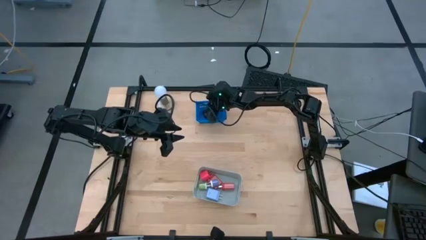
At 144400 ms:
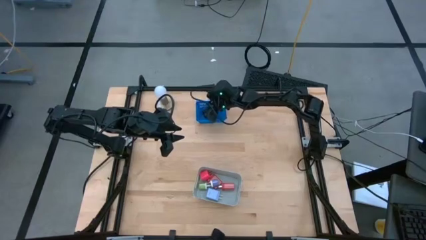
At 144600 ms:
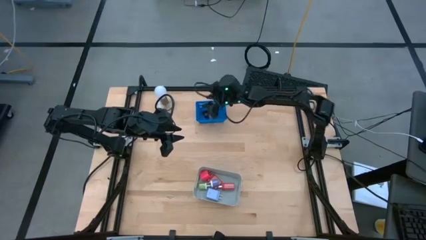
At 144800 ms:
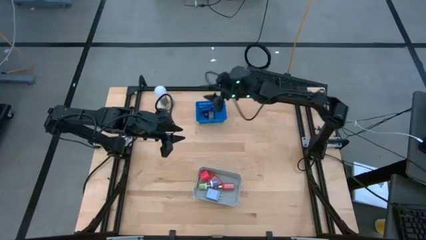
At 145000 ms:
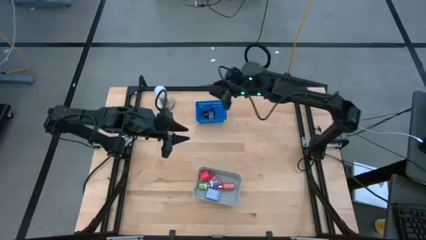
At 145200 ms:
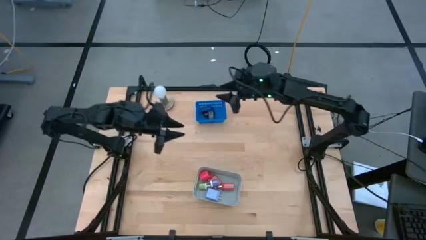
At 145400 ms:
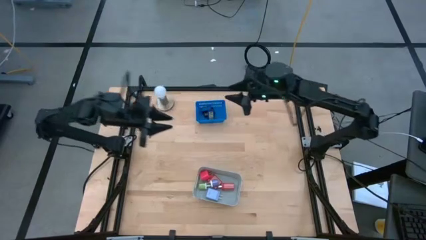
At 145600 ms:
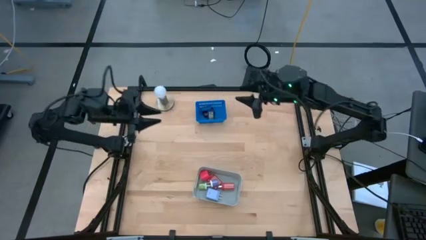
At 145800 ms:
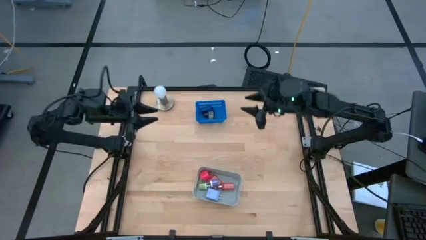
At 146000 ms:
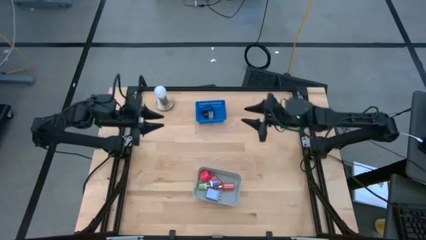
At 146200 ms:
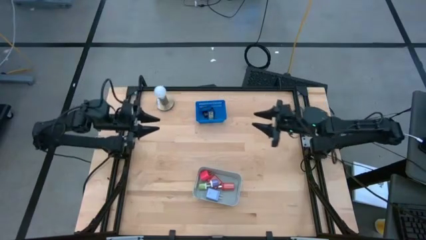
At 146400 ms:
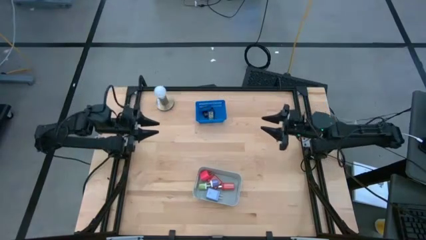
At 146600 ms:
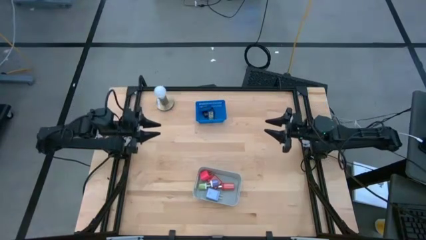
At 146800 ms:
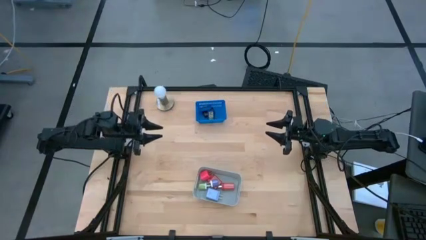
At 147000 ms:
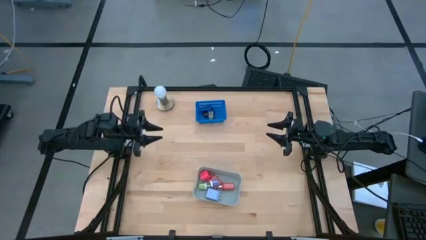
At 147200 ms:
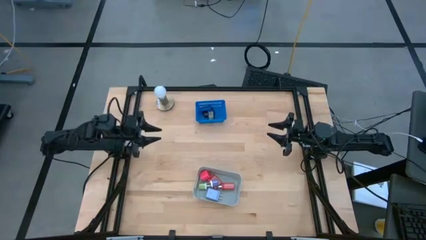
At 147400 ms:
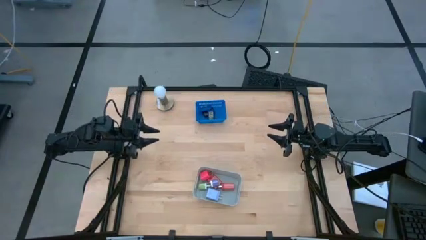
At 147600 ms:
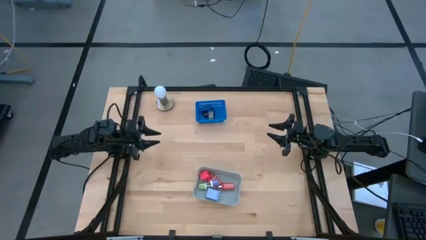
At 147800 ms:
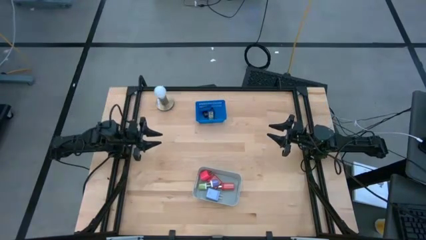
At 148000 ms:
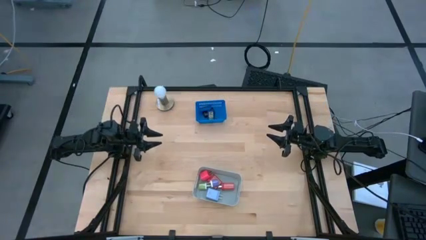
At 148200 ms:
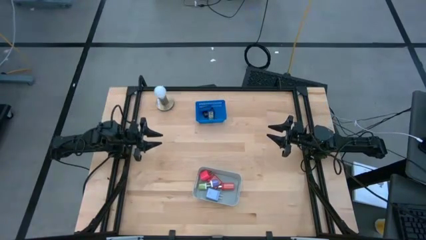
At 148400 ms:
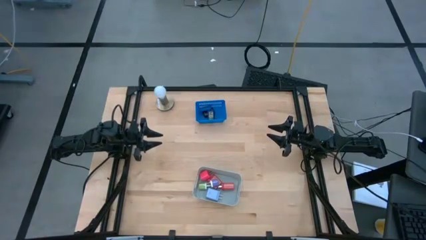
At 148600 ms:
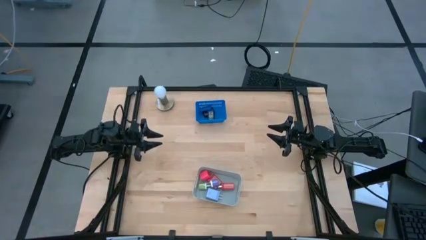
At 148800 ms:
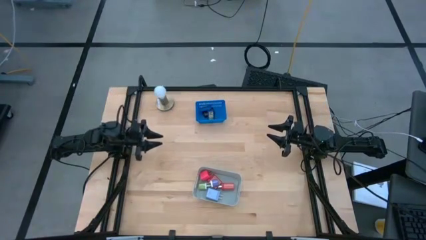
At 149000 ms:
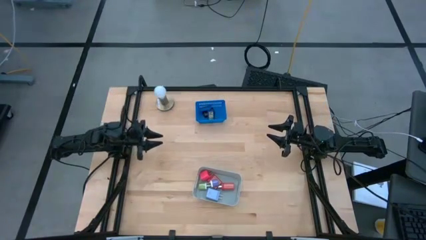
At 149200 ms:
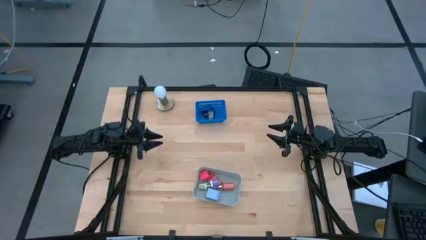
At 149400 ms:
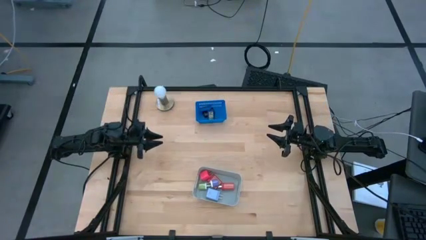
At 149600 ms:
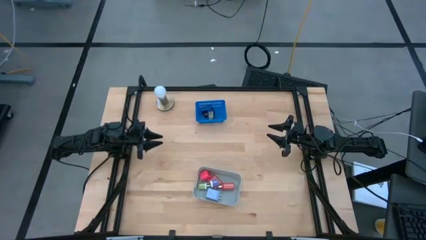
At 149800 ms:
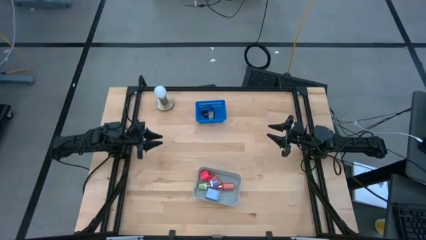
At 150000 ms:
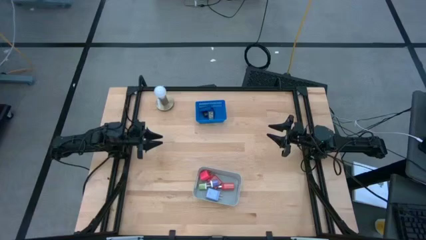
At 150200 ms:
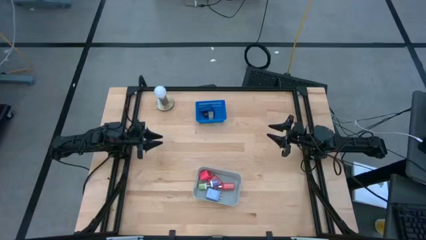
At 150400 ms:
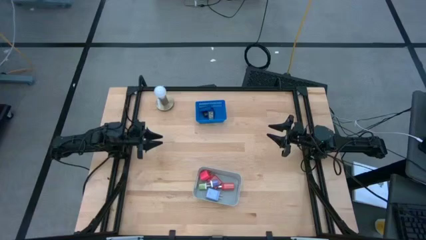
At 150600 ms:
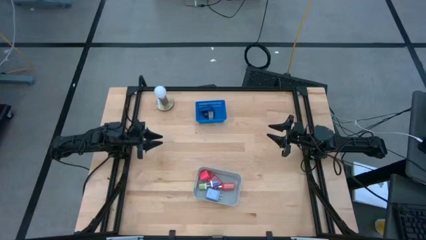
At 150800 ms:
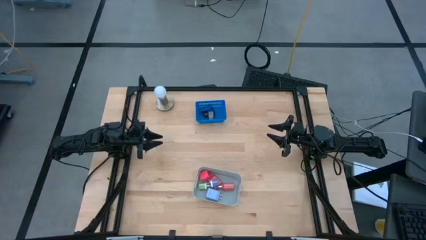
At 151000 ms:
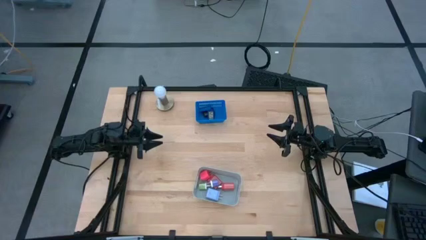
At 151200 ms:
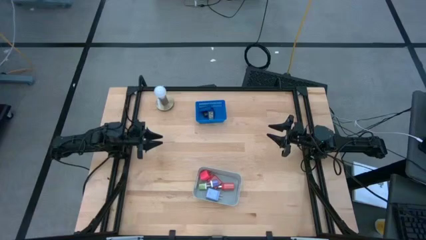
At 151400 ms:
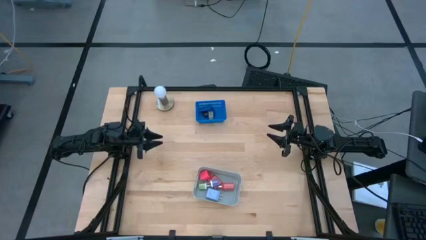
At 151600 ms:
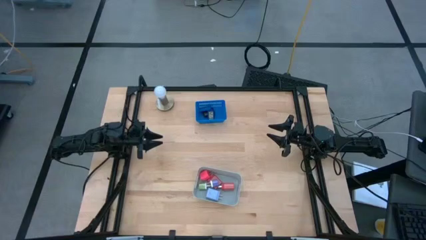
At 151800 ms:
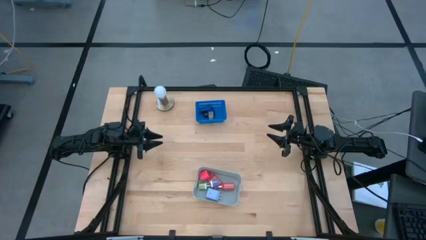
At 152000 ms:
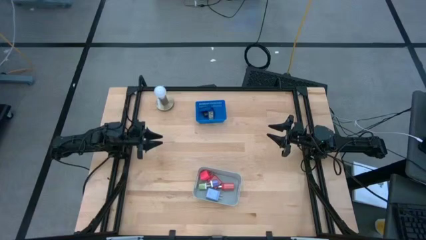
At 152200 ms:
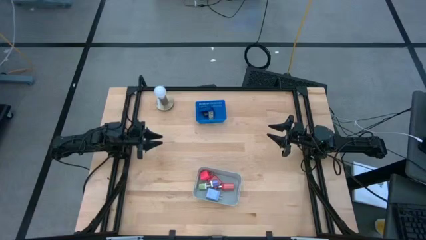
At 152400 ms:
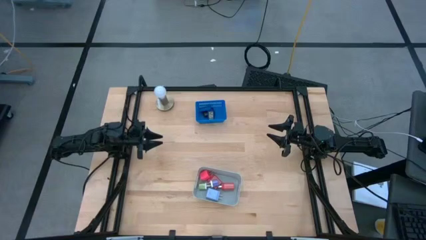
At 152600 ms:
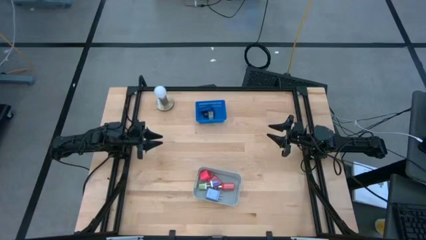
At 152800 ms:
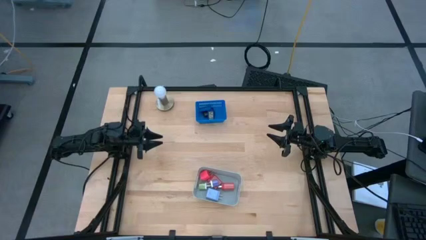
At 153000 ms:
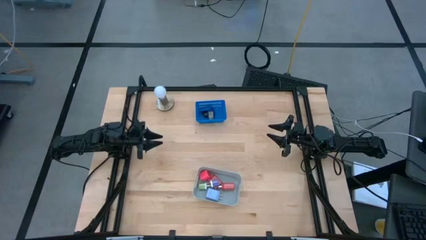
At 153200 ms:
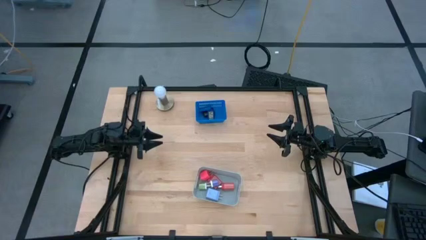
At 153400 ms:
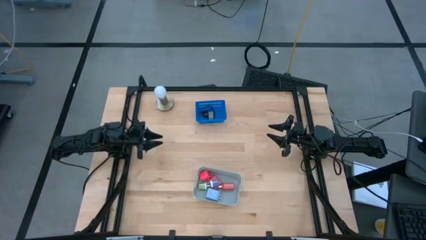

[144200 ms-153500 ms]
Task: Pick & Place Office items
Return to Home Position
